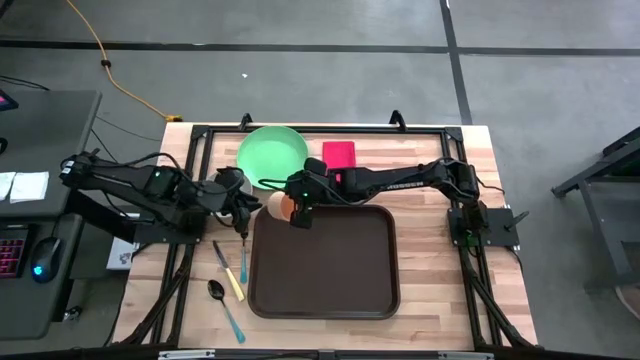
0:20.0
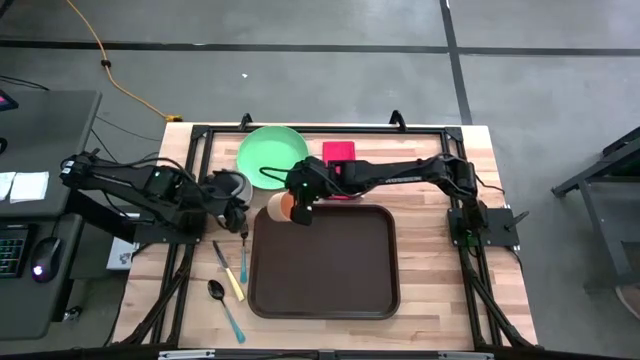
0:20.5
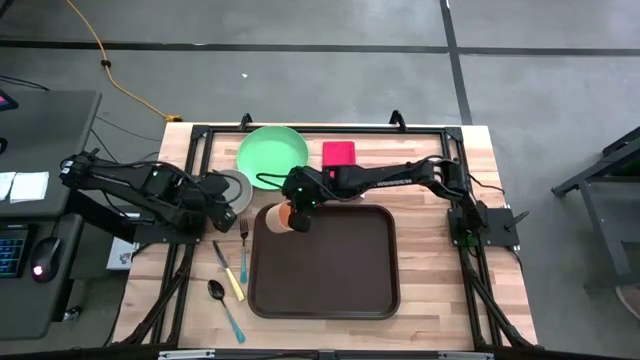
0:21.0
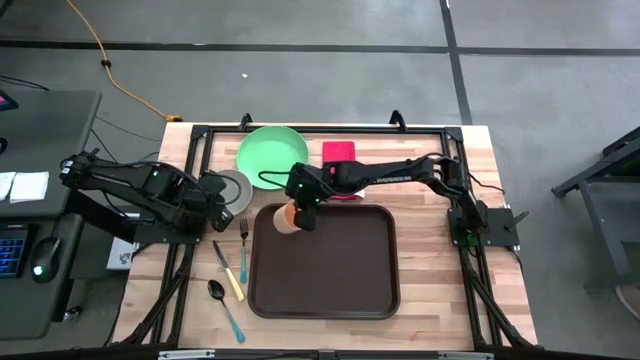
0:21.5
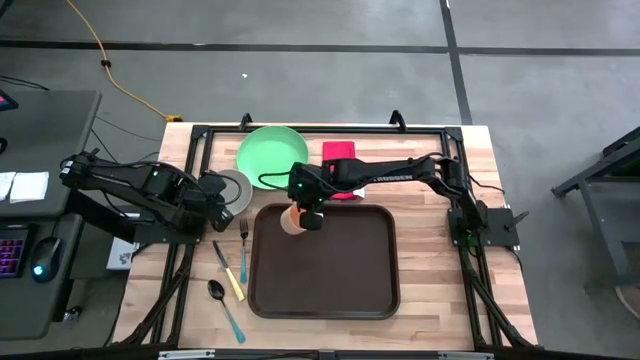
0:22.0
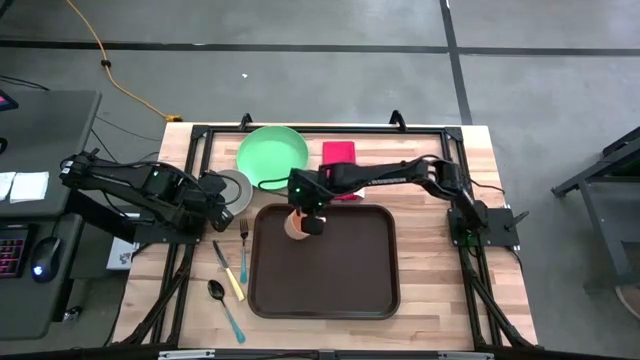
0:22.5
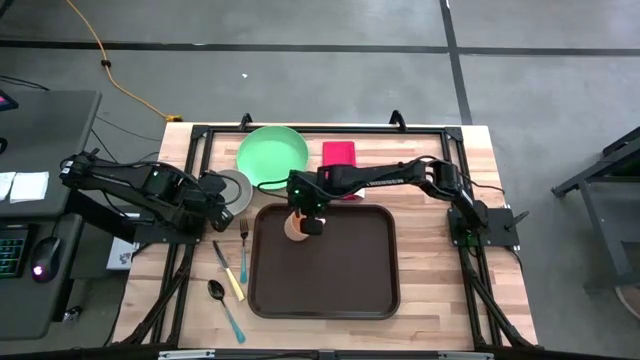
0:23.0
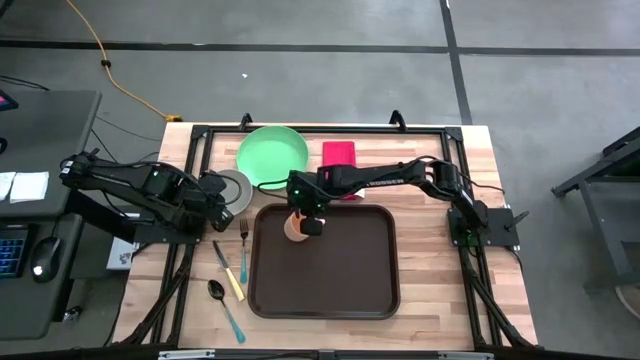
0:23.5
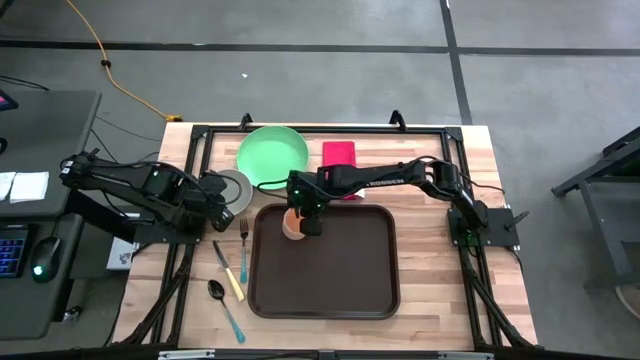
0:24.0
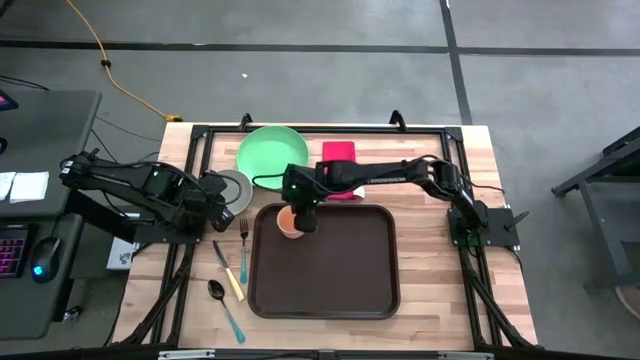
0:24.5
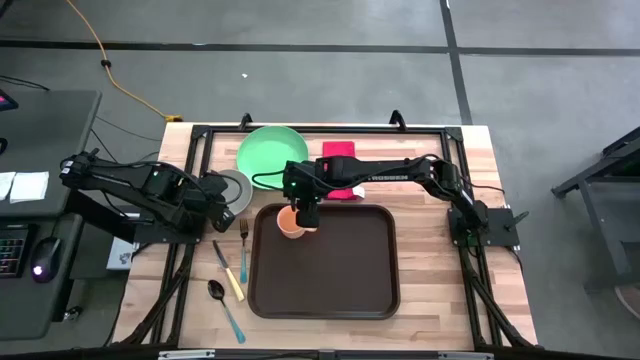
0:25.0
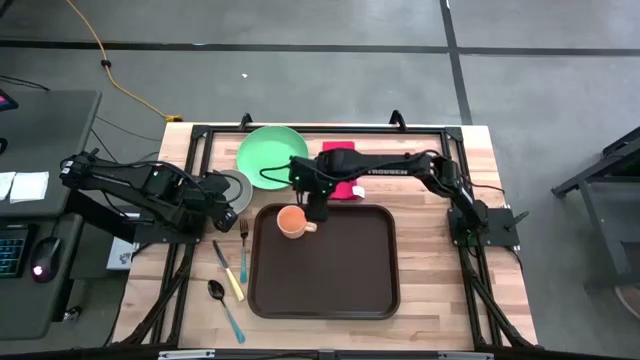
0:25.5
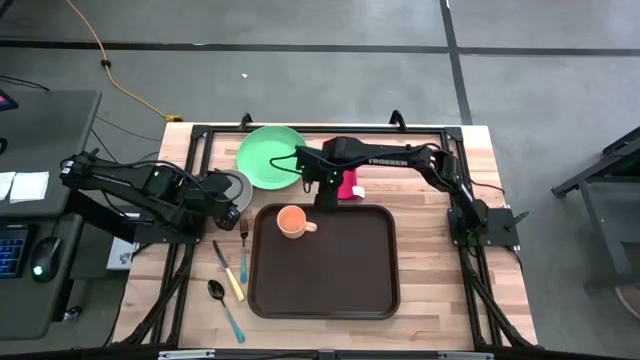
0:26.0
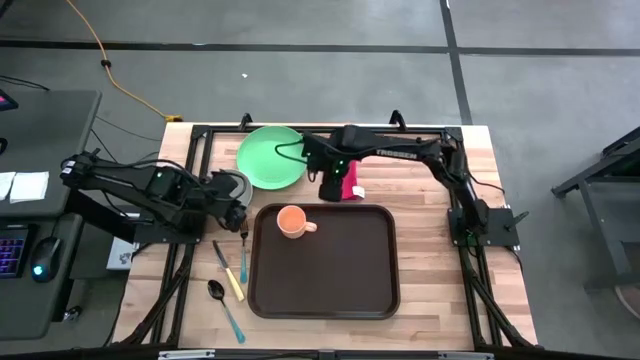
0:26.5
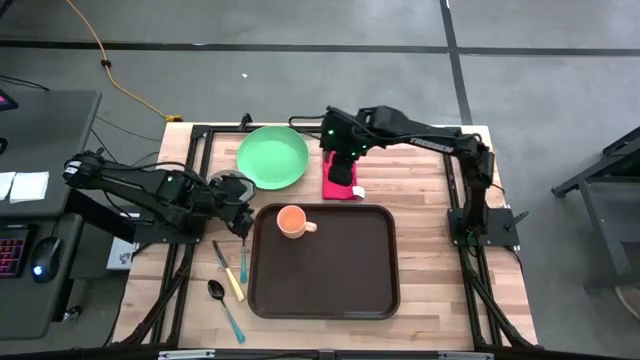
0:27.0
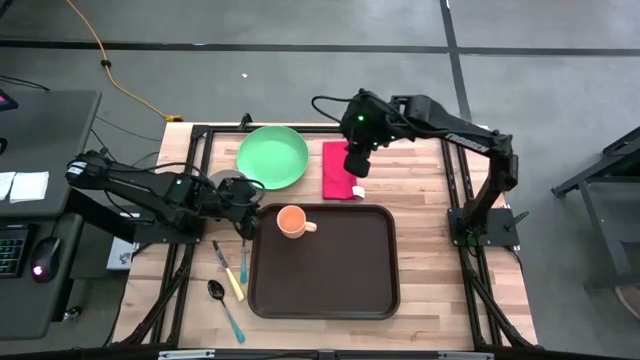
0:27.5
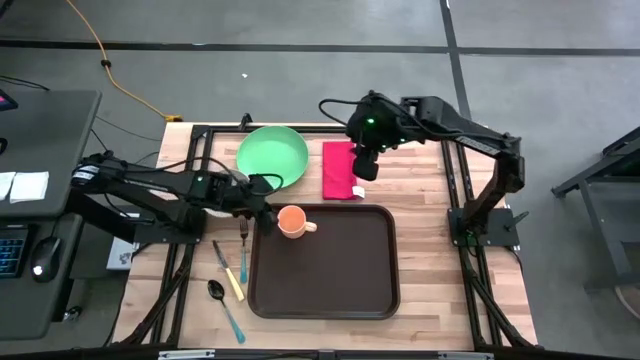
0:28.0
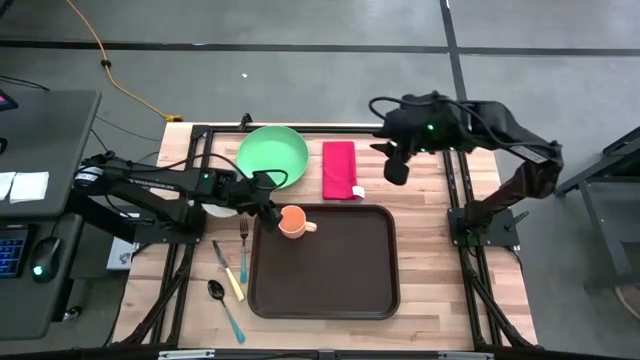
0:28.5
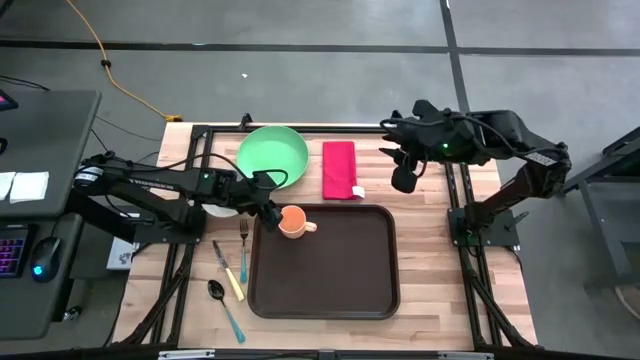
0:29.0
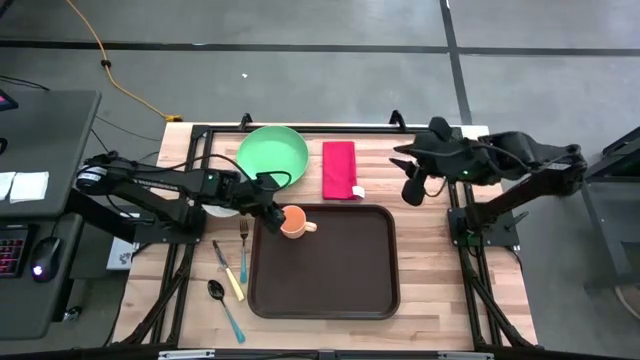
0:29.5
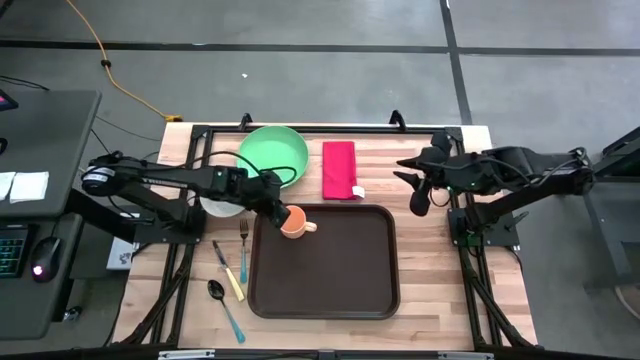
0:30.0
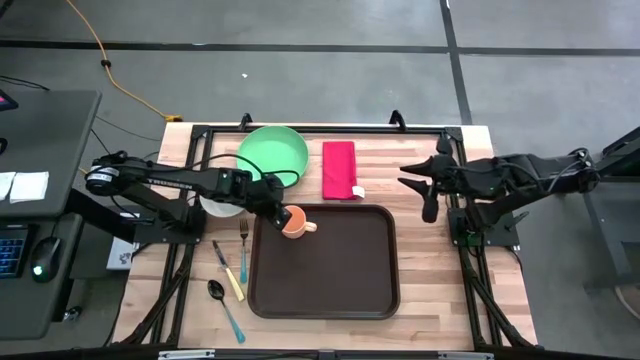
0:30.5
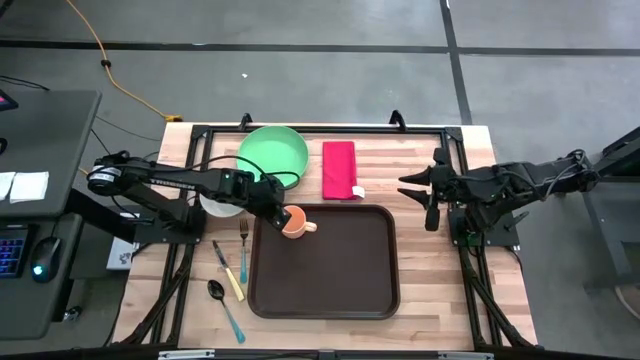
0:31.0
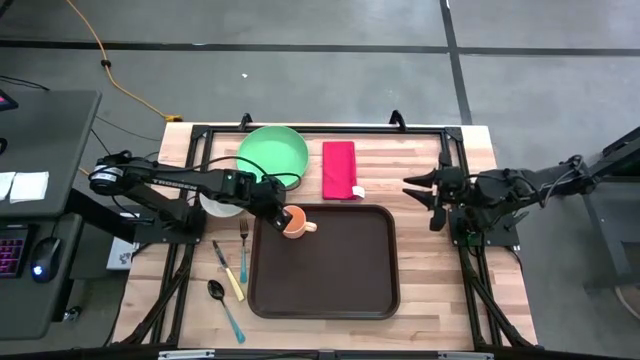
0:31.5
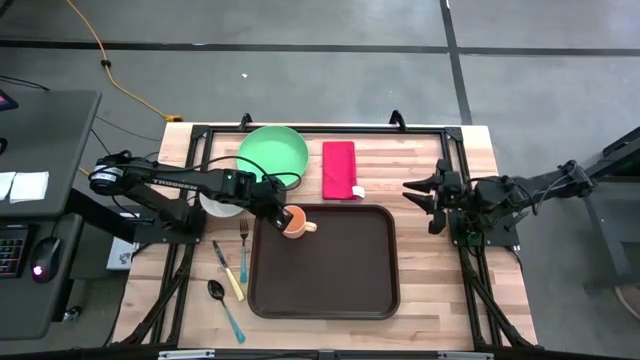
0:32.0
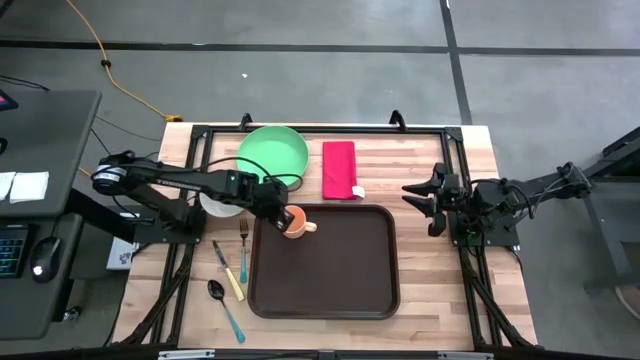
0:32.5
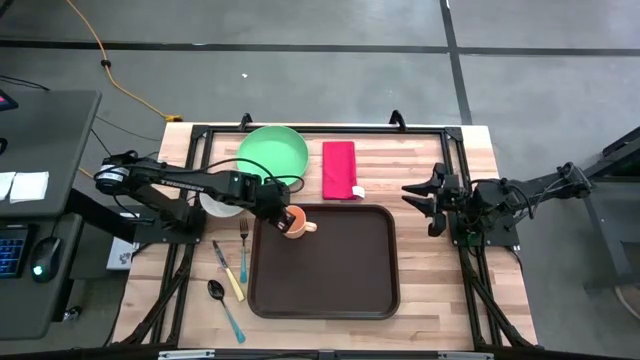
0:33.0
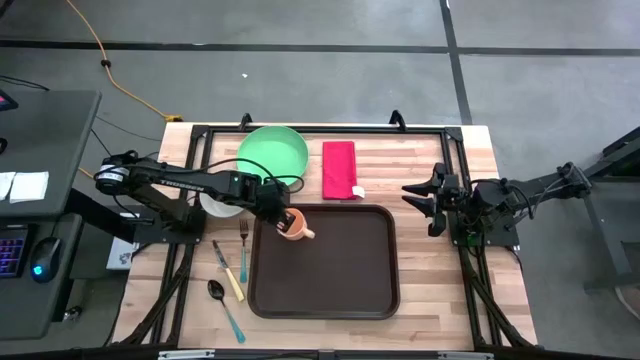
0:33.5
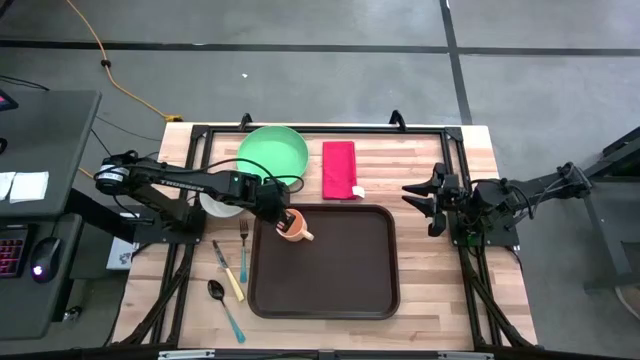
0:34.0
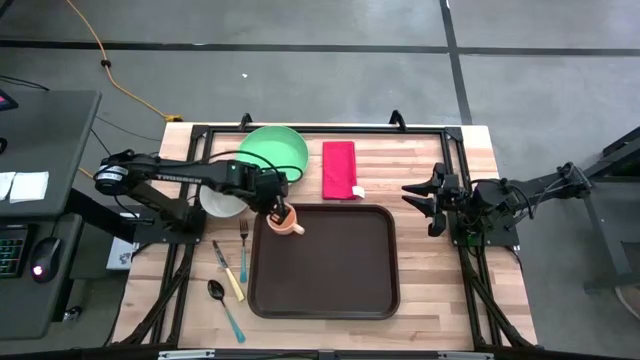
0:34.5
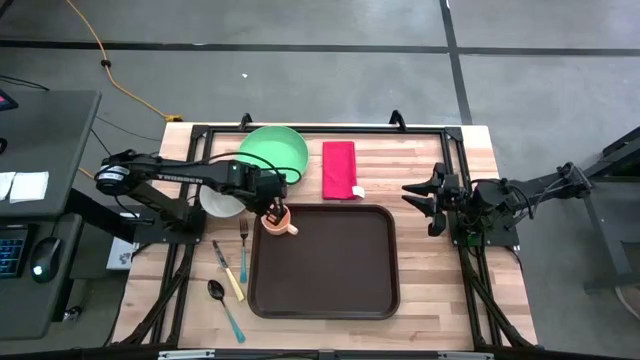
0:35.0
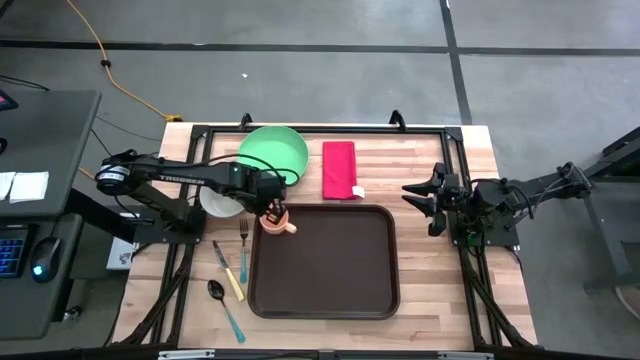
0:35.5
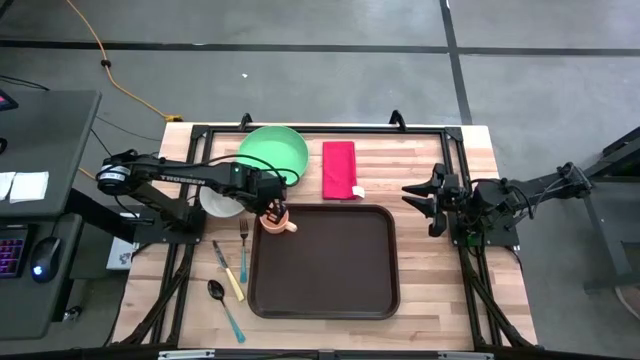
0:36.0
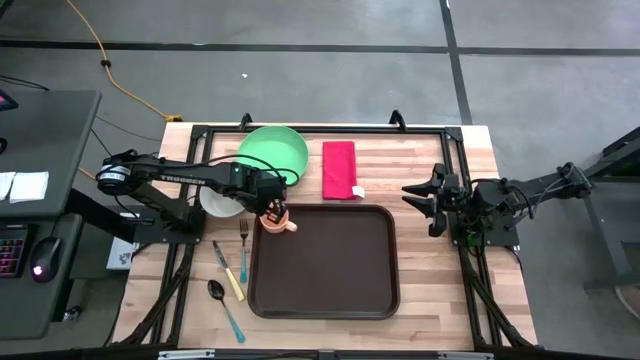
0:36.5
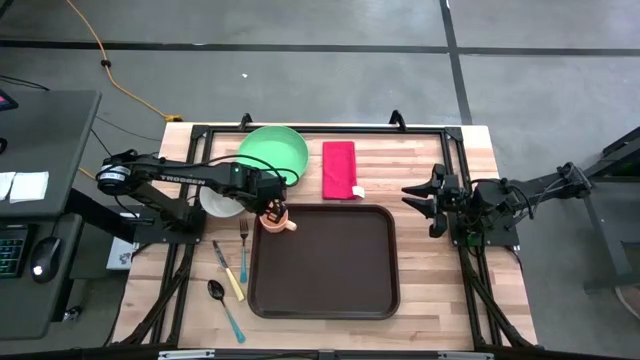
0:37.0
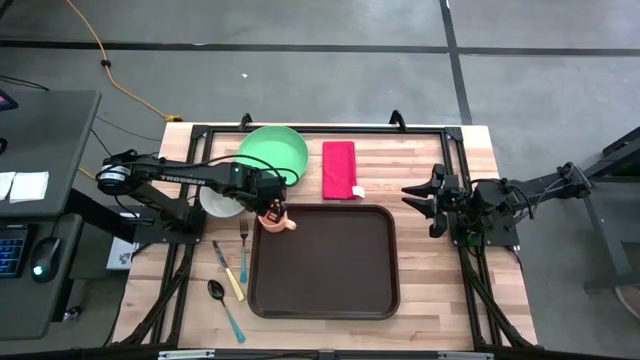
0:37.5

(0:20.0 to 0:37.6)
Task: Set up tray
Put the orange mug on the black serving tray

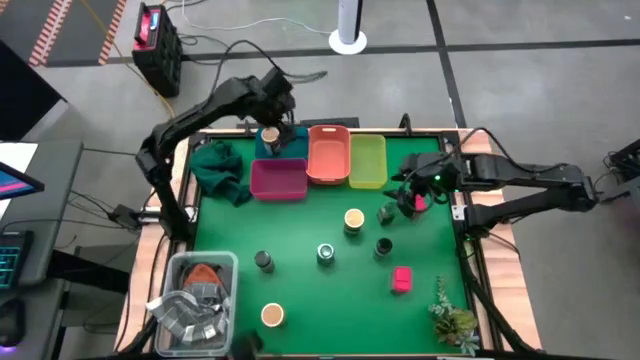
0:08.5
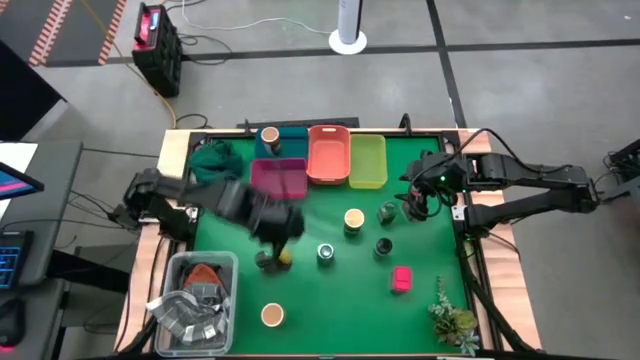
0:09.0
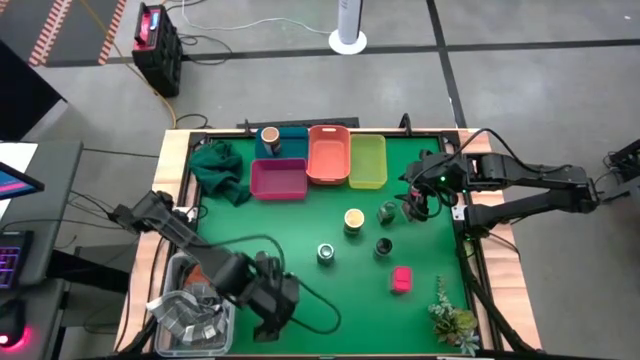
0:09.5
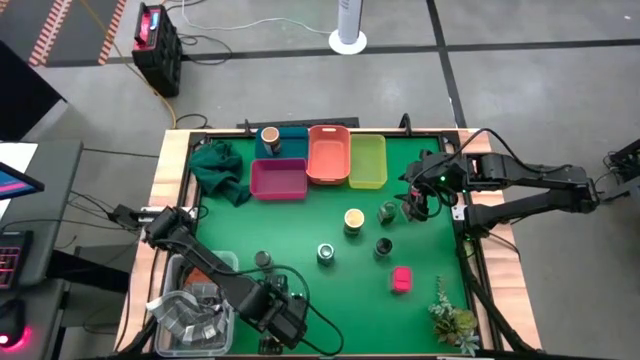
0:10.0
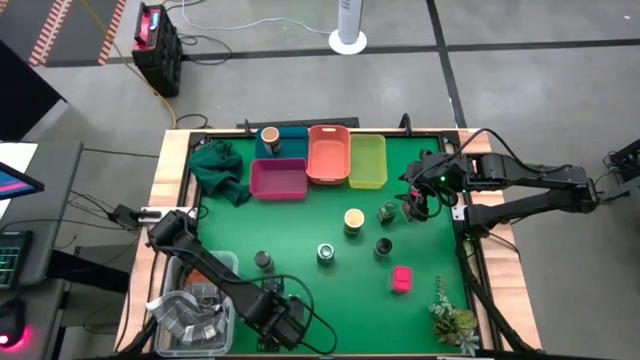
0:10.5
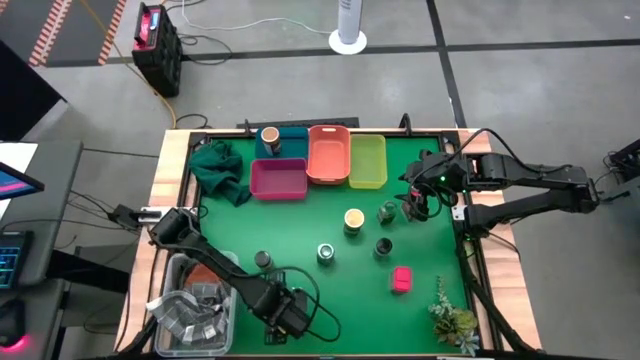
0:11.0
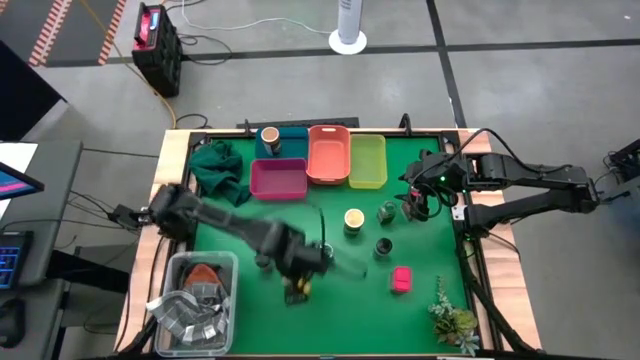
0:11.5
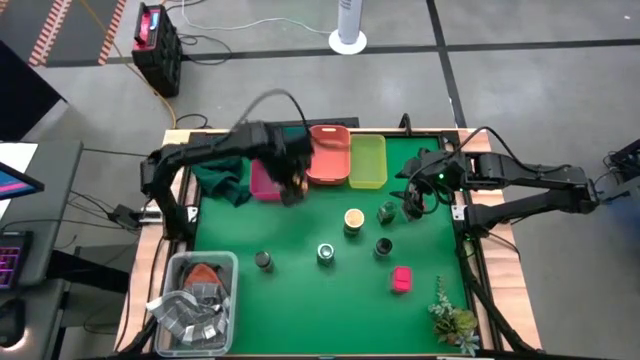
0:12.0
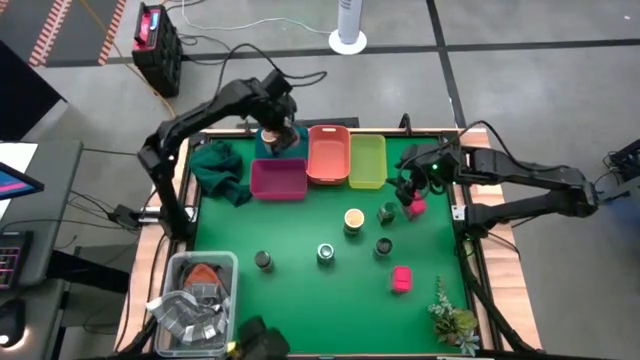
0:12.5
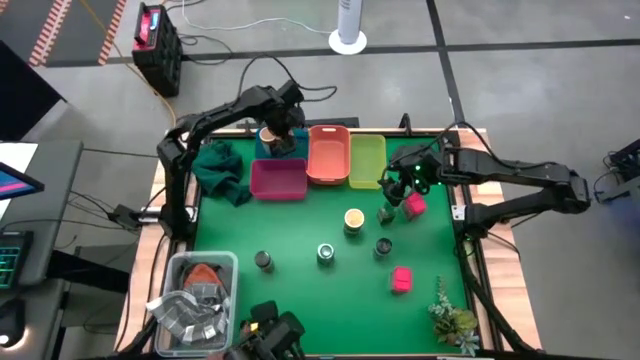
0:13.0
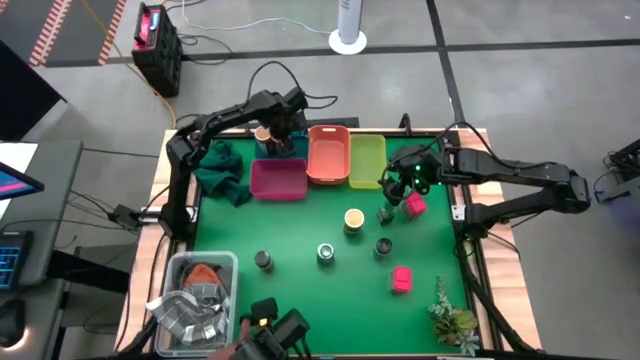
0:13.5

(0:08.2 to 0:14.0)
Task: Sort spices by type
Put the bottom gold seasoning bottle into the blue bin
